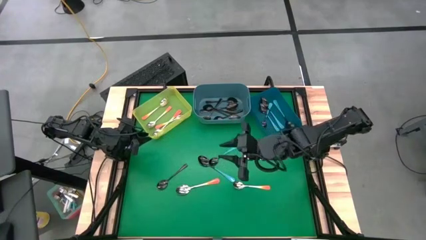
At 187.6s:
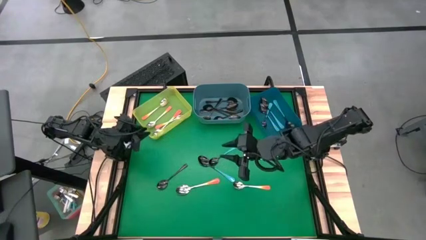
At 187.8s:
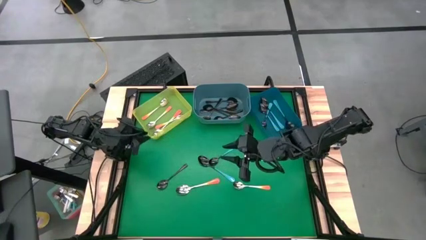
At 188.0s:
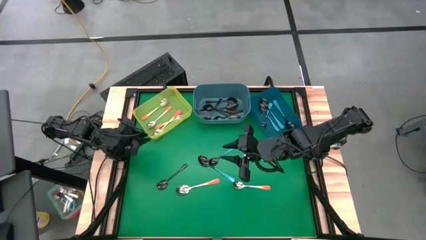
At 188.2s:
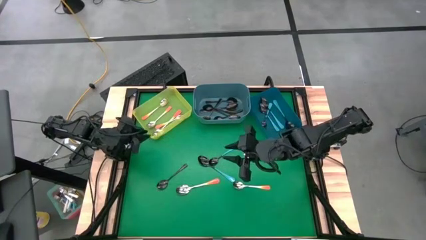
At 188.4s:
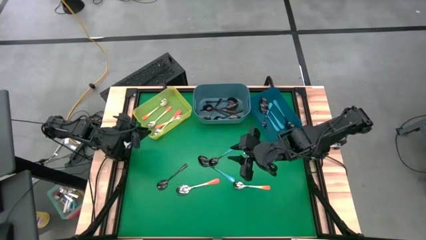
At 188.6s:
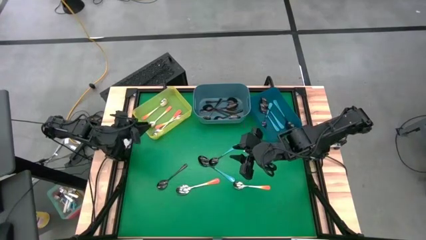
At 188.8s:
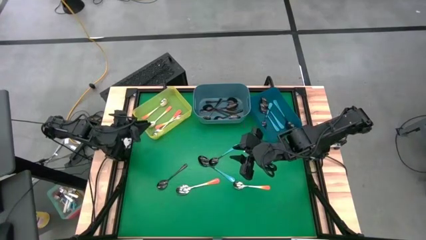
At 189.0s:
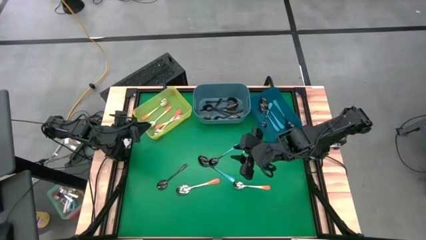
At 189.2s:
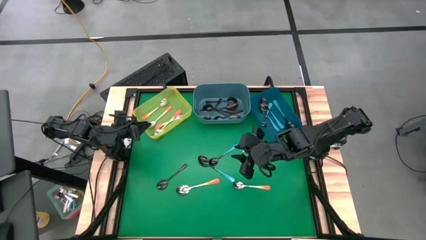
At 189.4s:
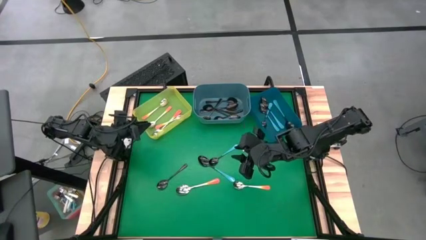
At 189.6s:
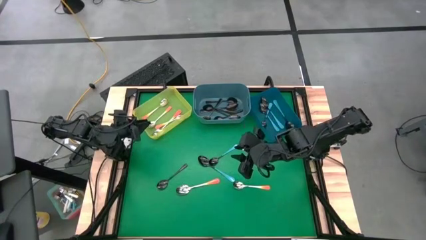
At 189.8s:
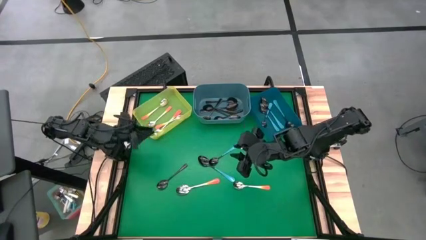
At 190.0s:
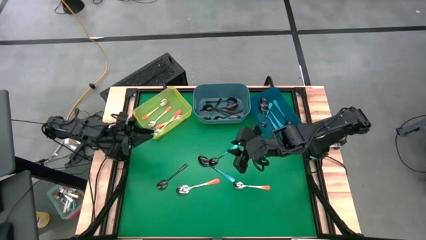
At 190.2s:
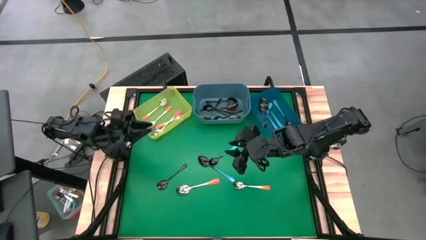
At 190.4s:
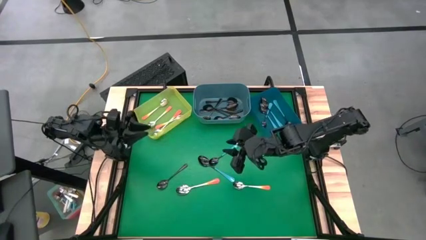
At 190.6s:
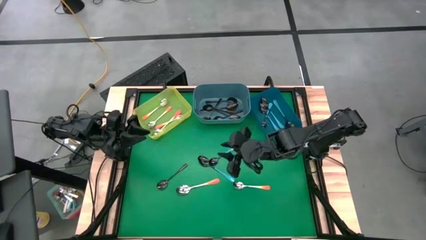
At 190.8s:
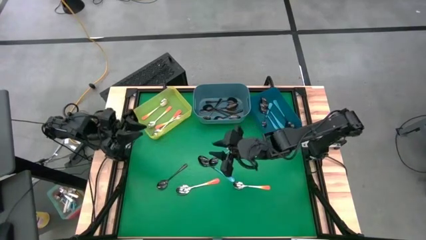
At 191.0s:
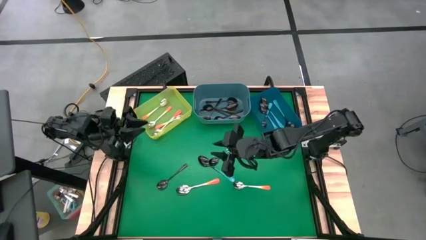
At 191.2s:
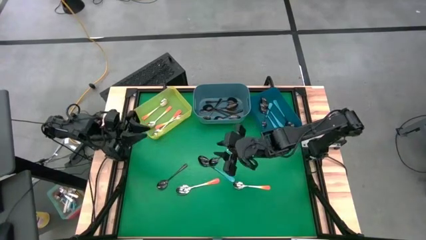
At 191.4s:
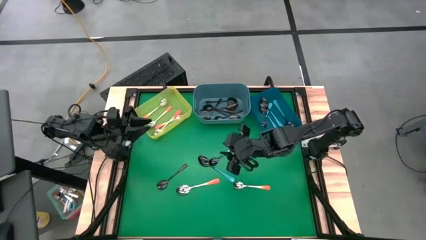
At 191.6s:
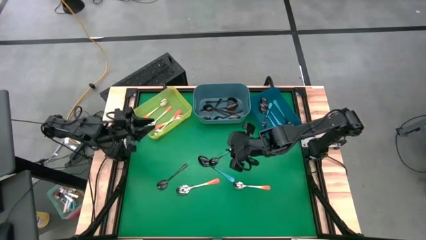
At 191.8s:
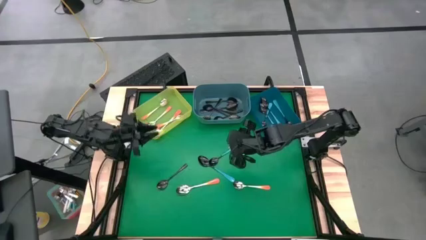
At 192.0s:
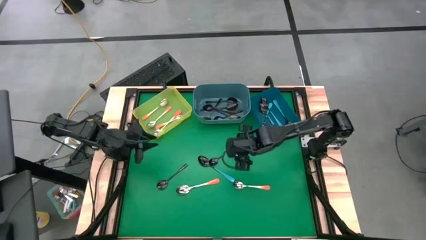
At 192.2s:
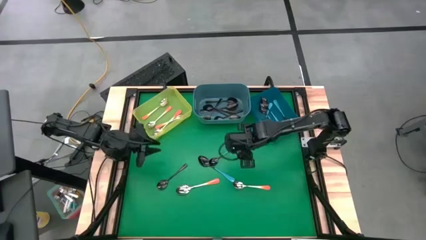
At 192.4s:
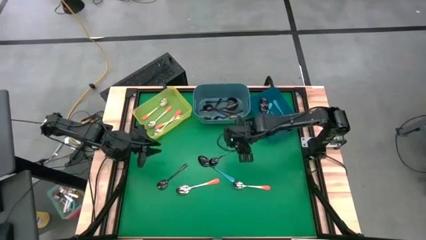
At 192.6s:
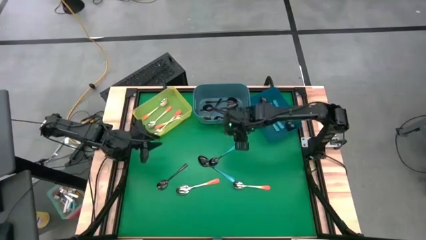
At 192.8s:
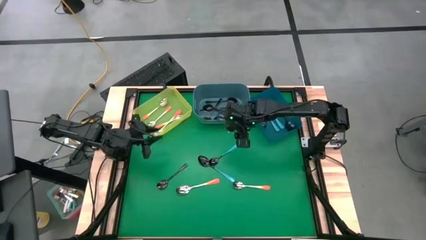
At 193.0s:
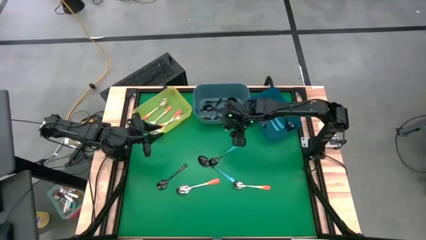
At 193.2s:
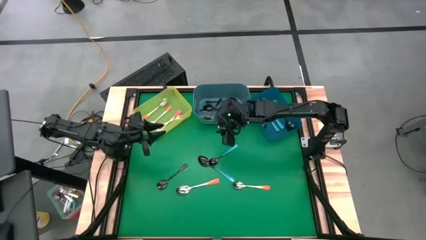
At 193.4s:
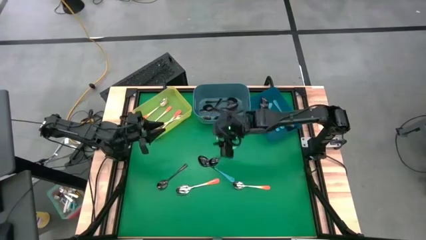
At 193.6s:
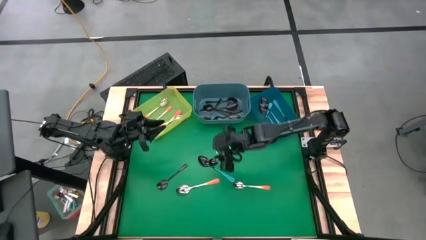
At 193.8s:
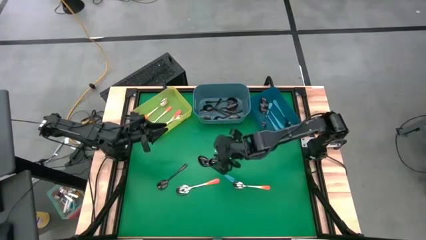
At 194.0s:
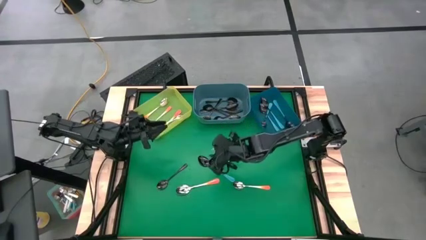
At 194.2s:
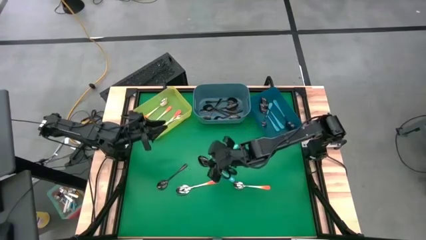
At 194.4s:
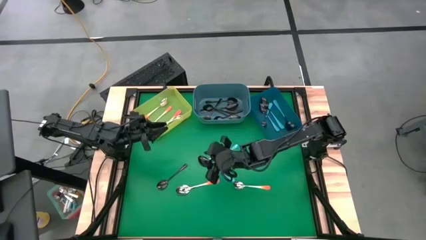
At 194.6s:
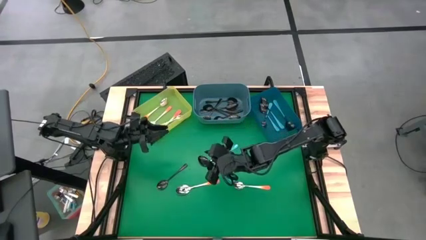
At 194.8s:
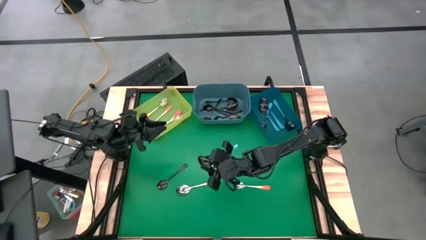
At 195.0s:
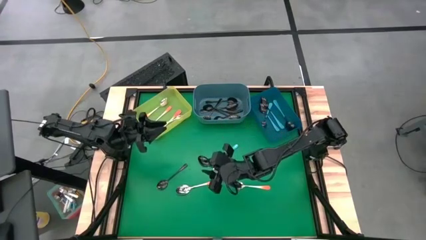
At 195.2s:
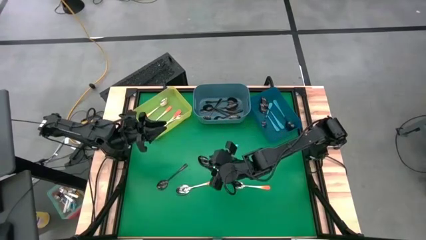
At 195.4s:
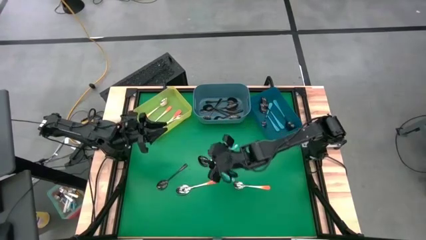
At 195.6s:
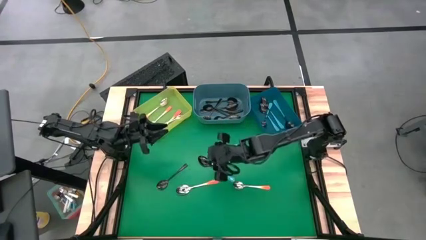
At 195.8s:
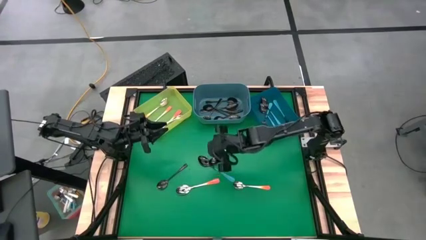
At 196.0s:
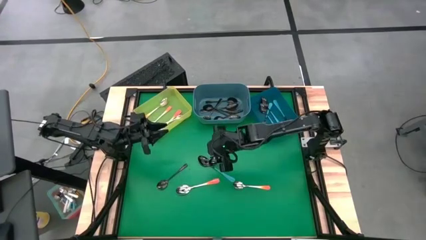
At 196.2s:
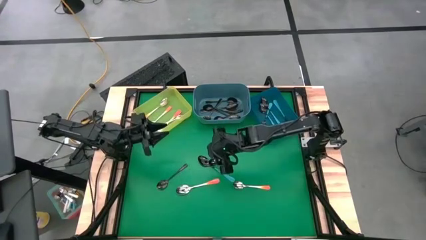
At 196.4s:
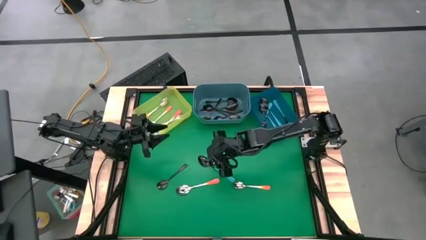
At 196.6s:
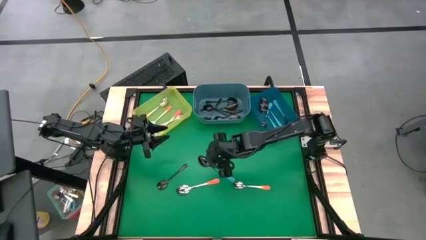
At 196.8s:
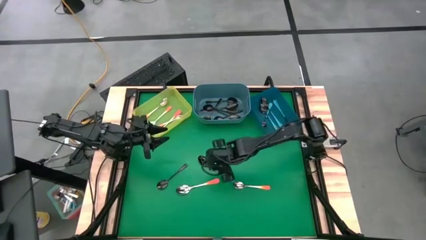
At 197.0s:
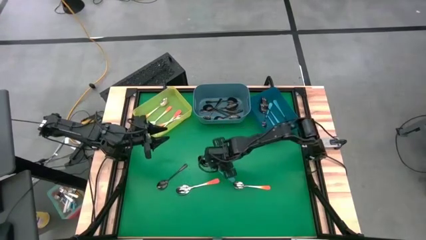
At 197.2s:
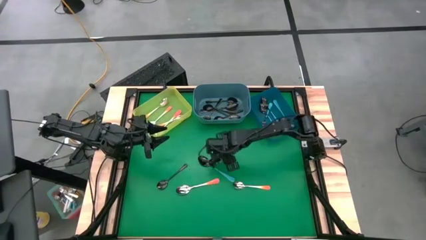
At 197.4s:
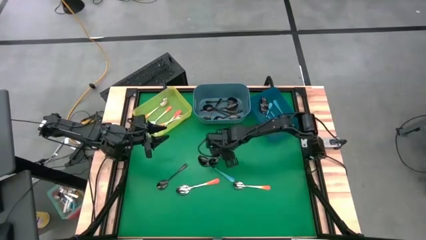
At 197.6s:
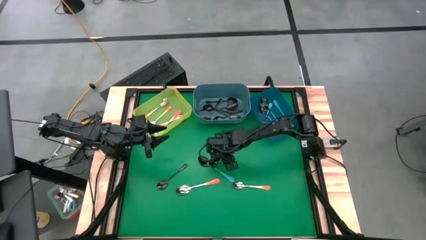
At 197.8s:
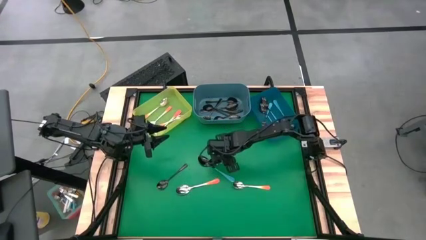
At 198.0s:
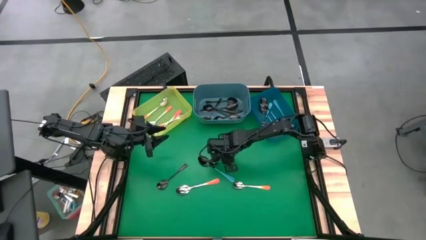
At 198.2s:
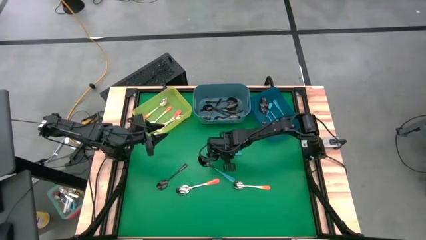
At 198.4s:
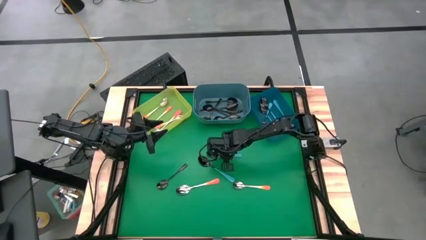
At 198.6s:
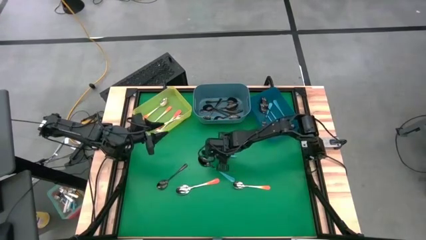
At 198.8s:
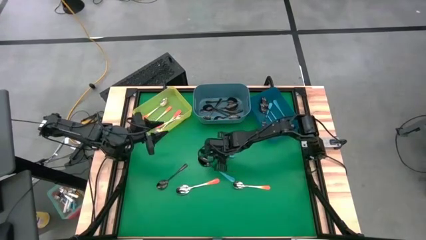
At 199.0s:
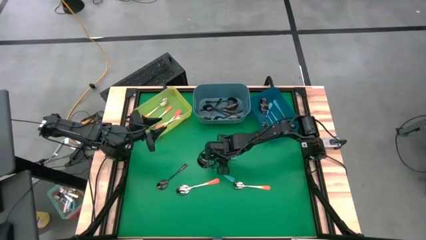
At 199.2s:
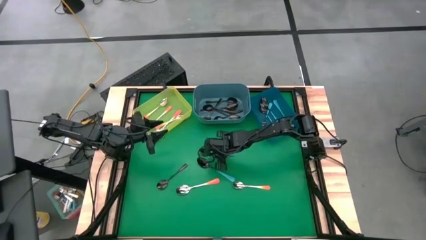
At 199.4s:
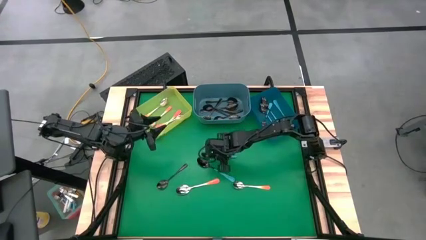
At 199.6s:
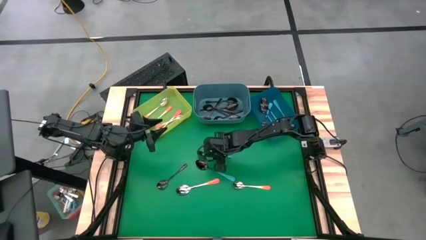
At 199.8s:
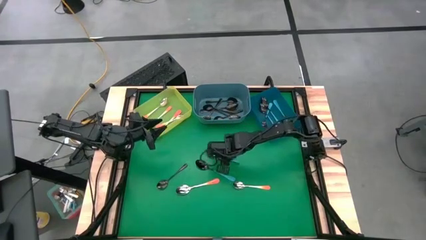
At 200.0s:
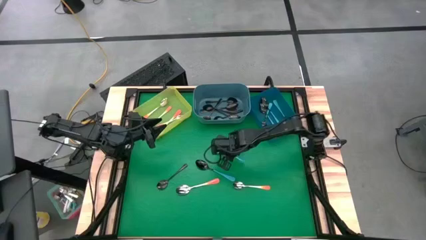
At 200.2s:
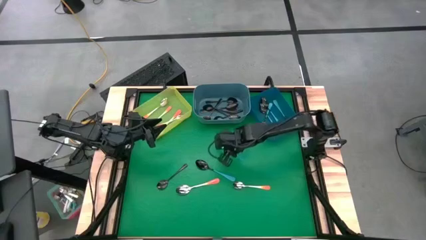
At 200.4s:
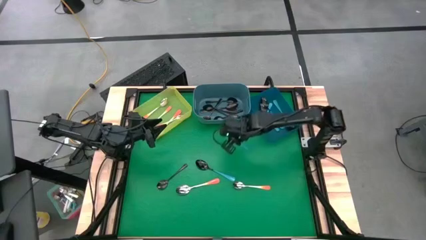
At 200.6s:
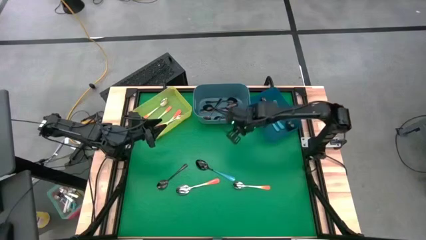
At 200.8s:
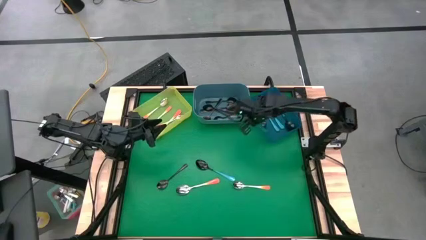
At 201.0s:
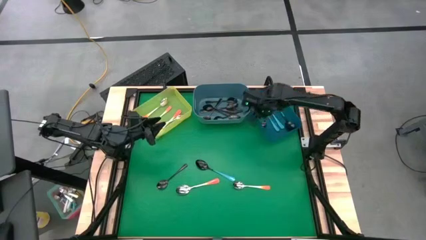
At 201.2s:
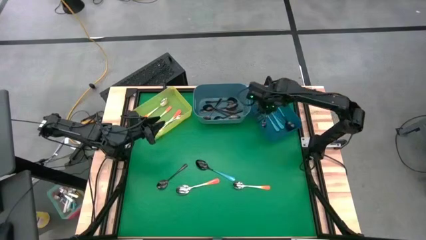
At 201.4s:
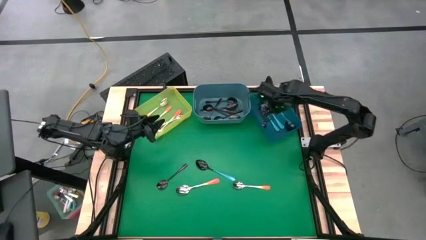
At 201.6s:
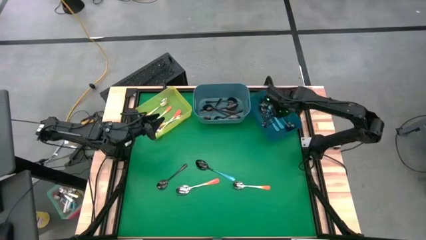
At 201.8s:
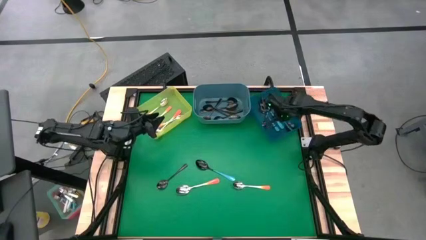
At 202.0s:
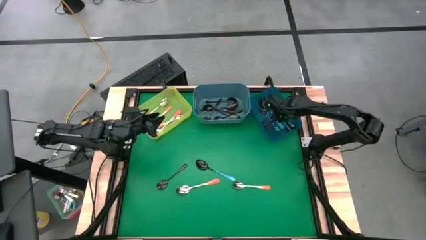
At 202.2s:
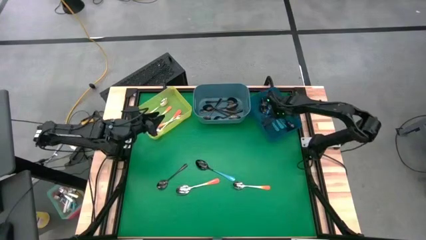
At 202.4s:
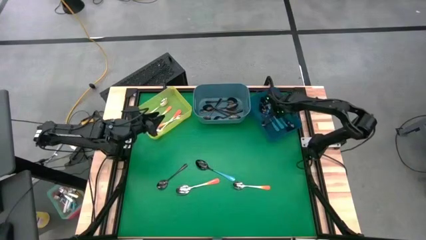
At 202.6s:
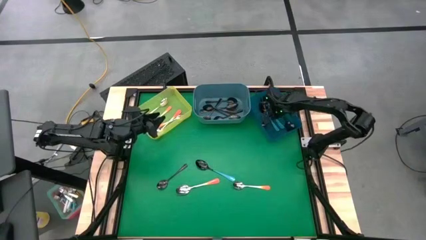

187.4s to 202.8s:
Task: Sort silverware by color (type)
Put the blue spoon into the blue bin
